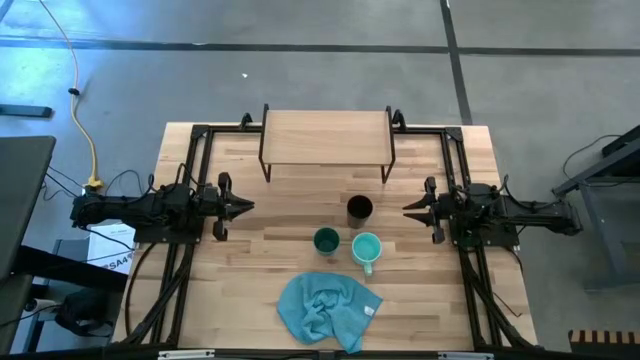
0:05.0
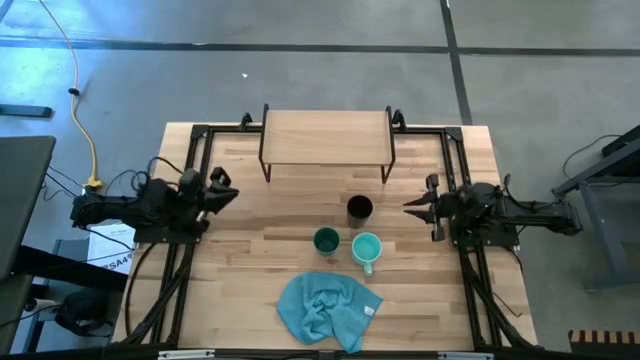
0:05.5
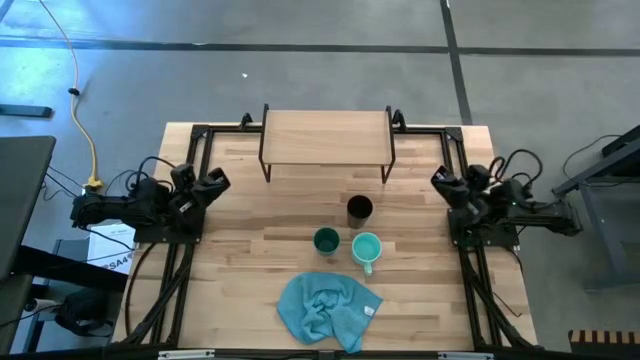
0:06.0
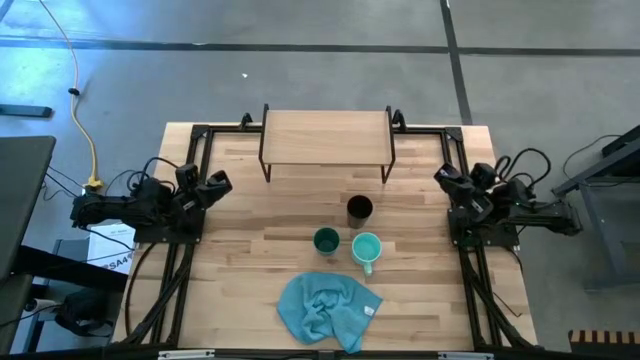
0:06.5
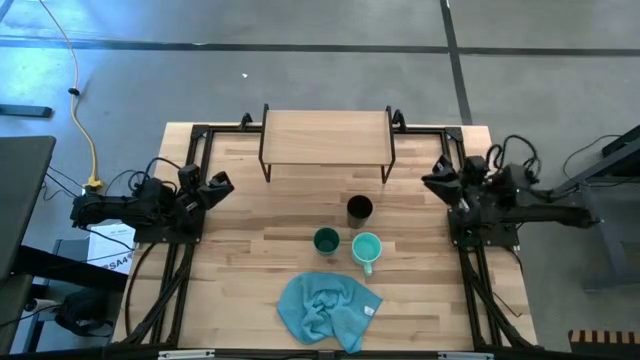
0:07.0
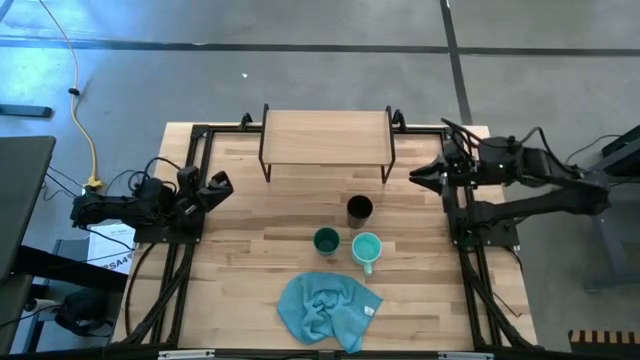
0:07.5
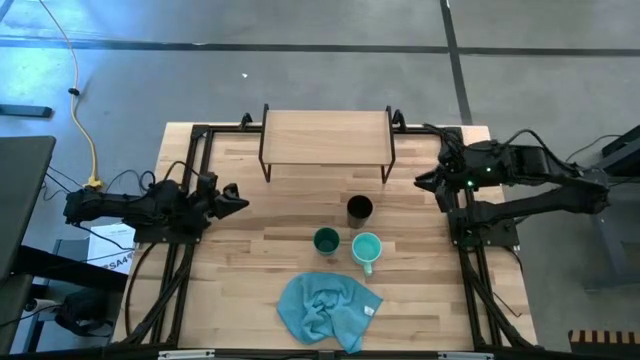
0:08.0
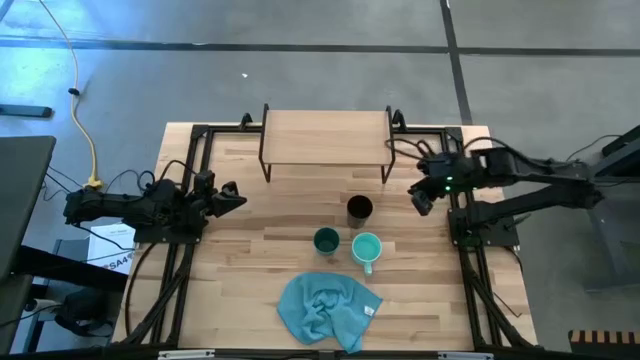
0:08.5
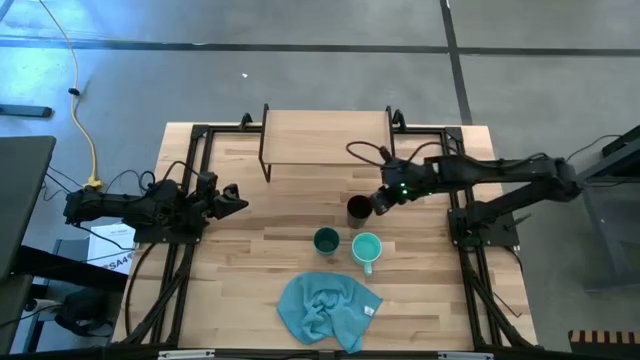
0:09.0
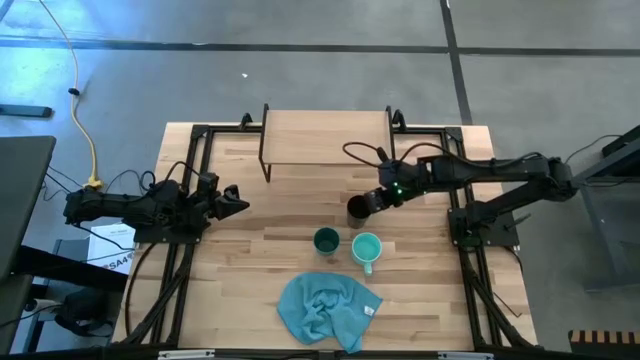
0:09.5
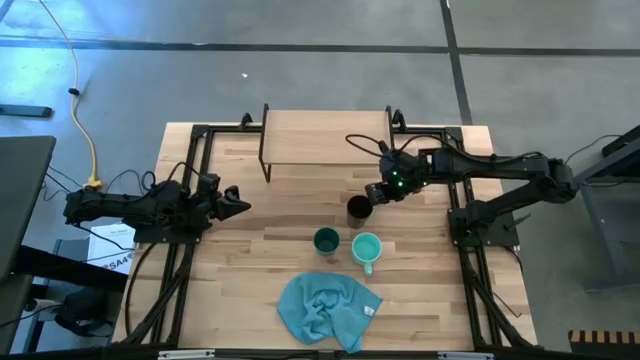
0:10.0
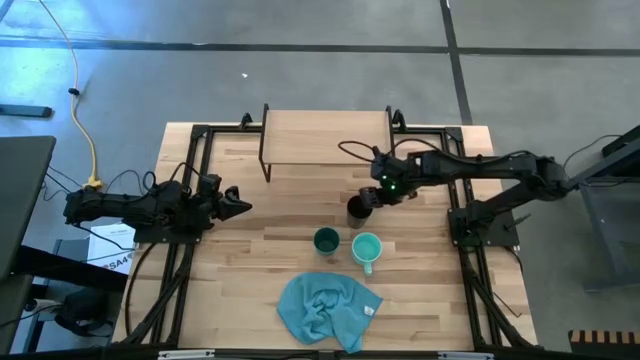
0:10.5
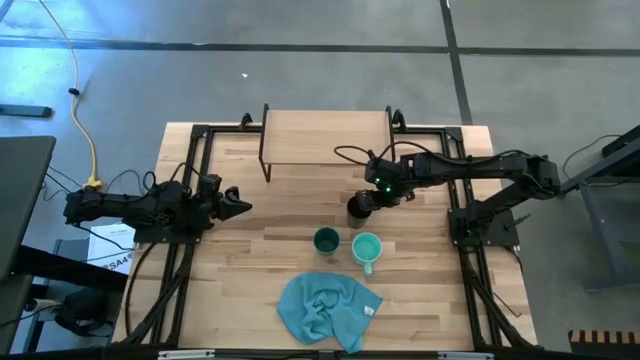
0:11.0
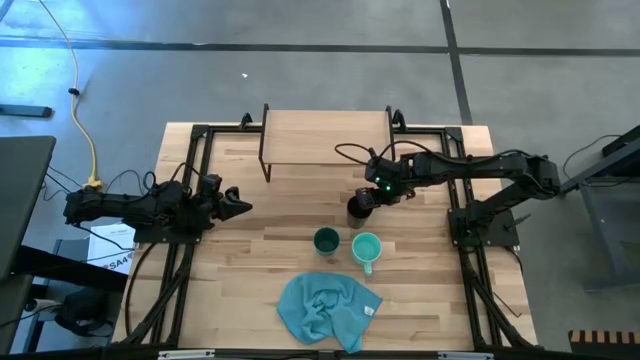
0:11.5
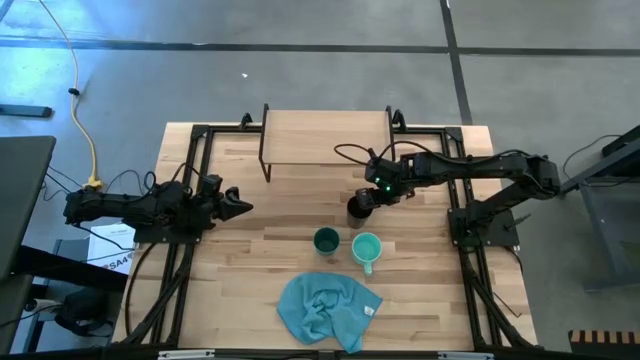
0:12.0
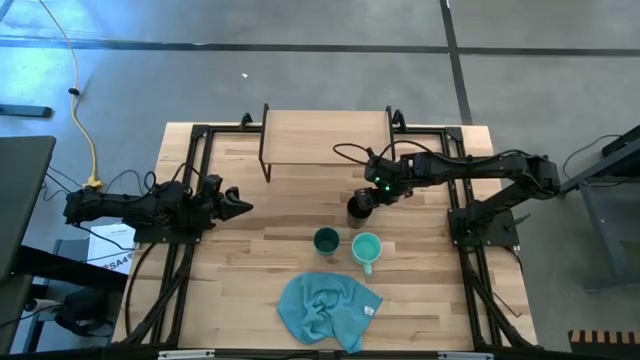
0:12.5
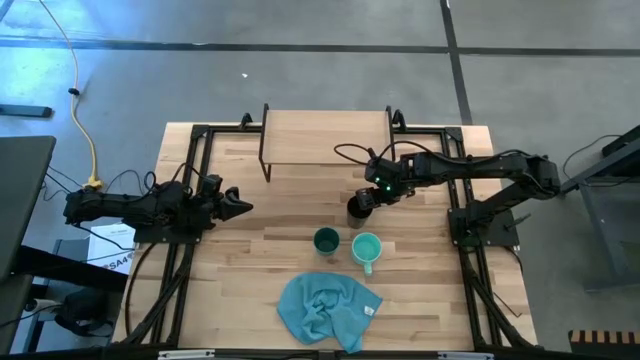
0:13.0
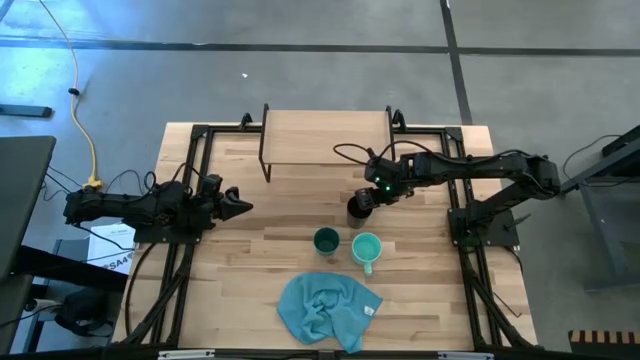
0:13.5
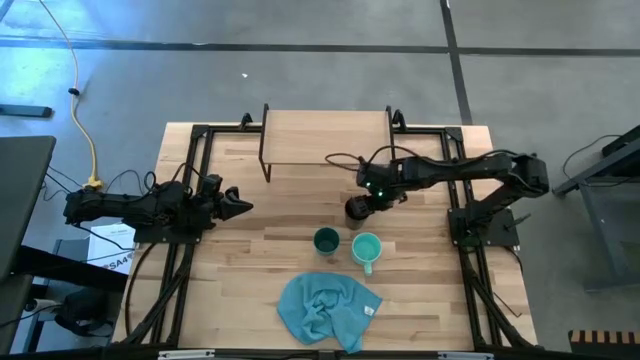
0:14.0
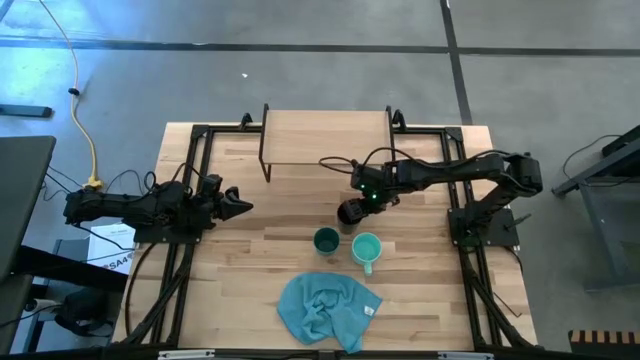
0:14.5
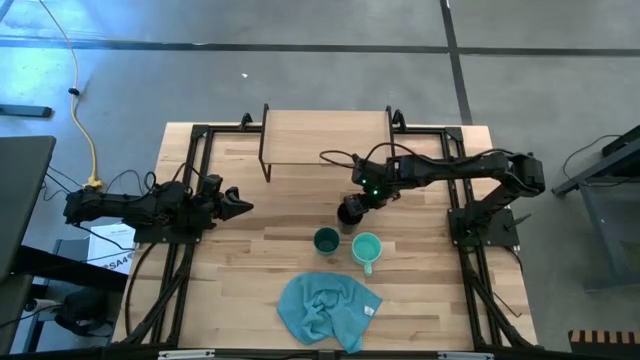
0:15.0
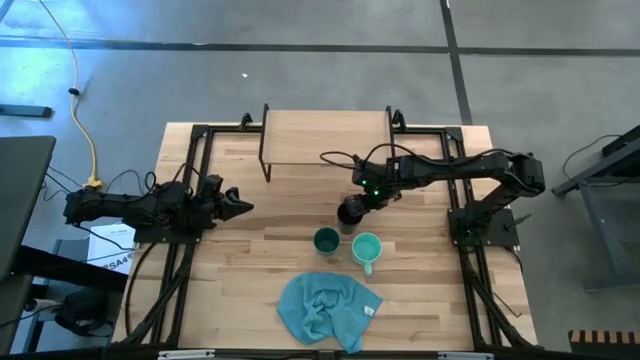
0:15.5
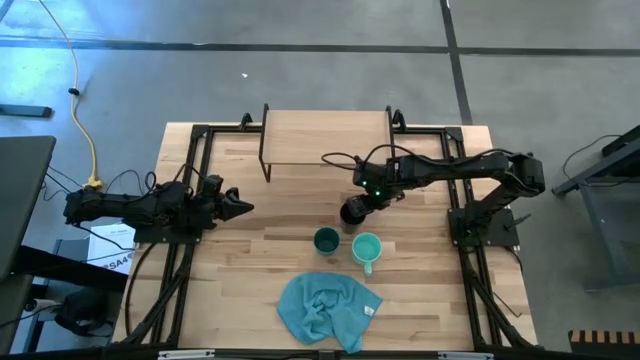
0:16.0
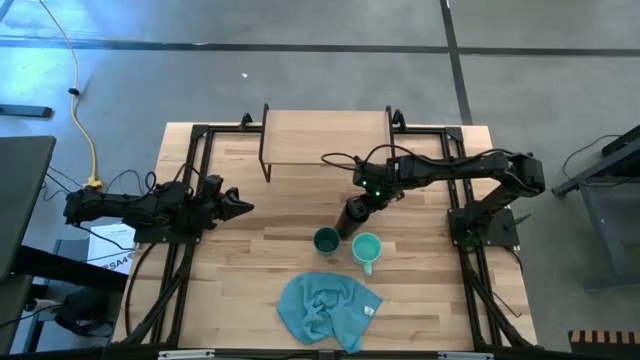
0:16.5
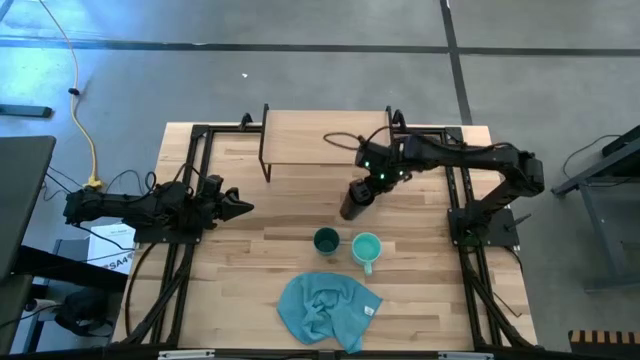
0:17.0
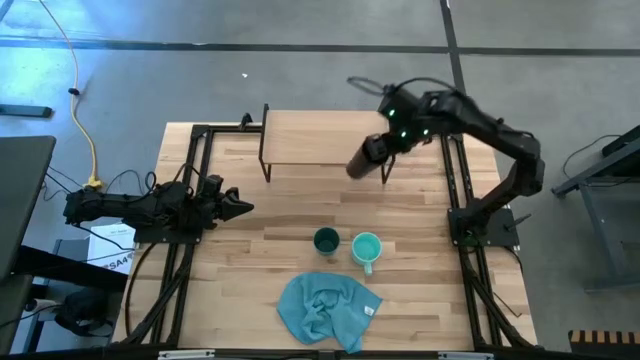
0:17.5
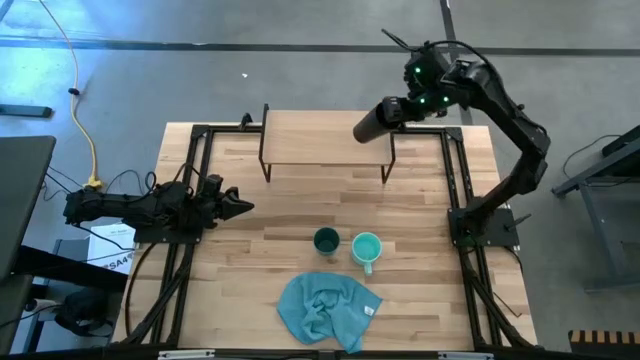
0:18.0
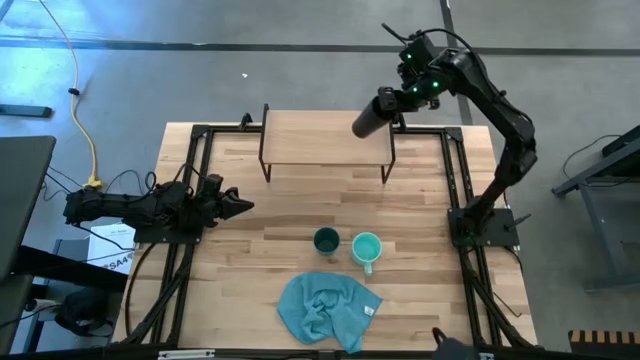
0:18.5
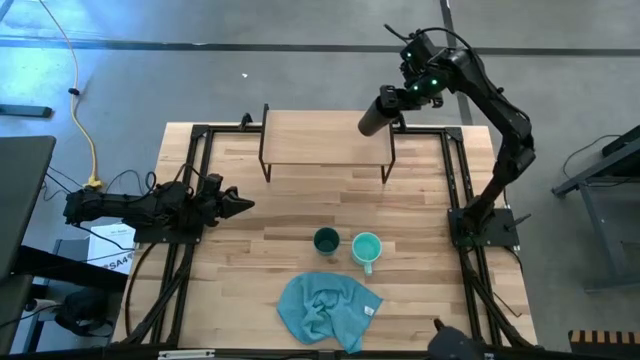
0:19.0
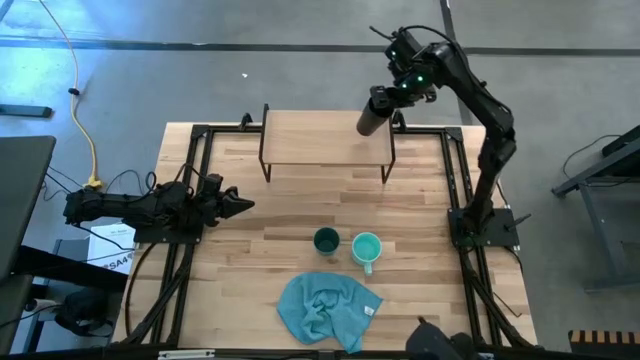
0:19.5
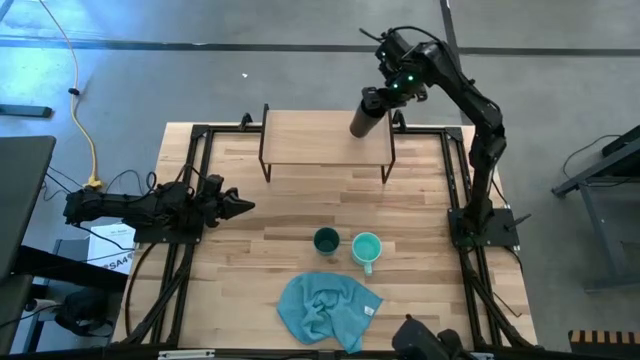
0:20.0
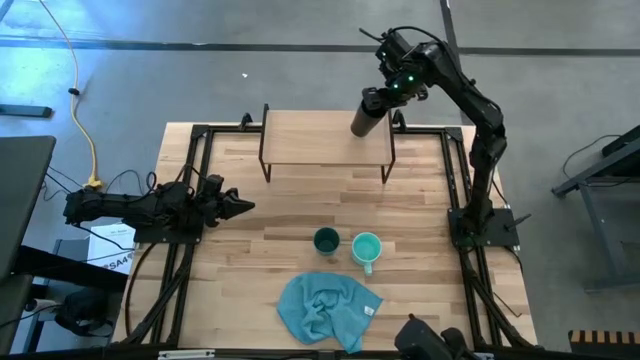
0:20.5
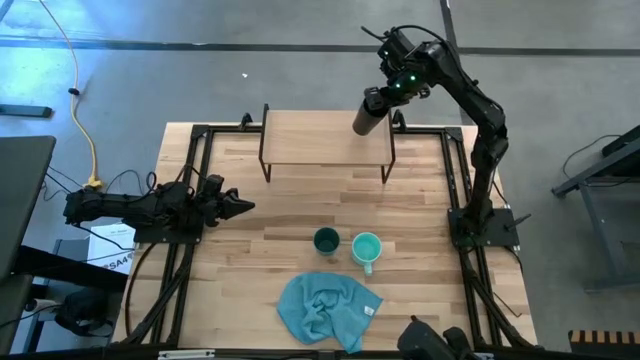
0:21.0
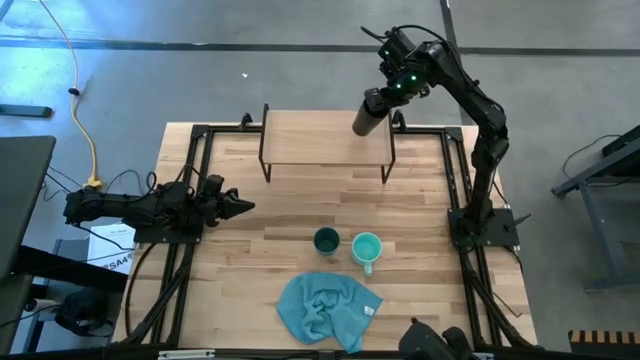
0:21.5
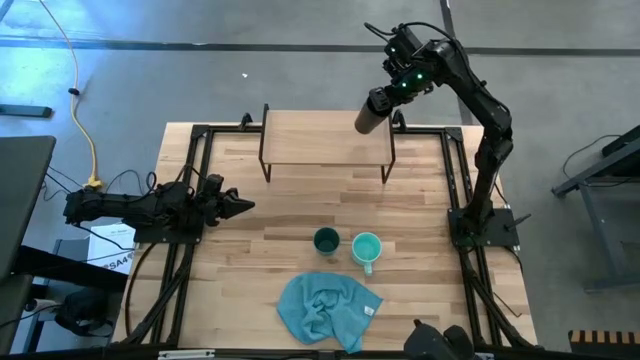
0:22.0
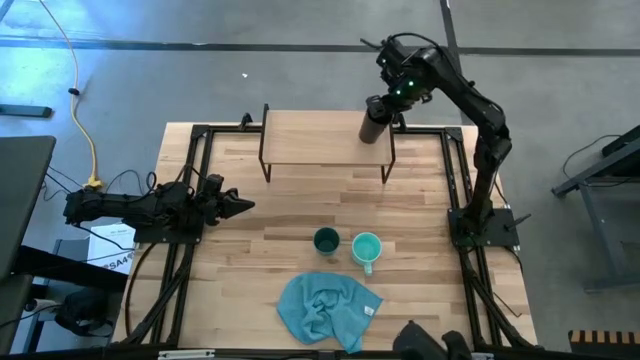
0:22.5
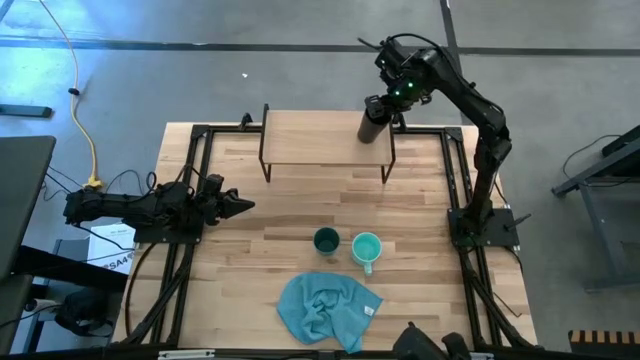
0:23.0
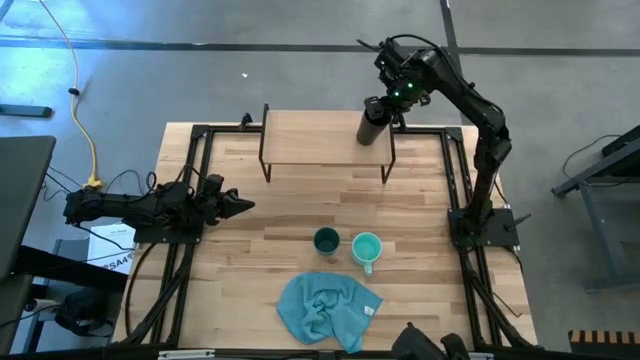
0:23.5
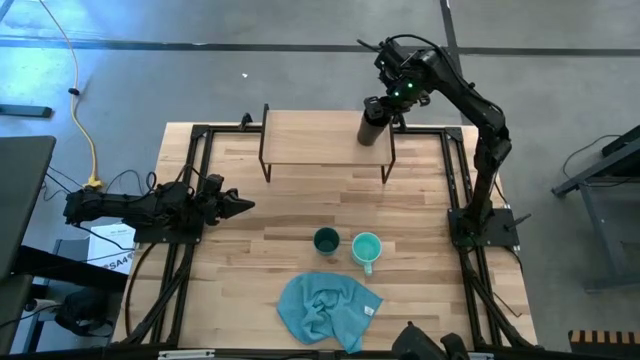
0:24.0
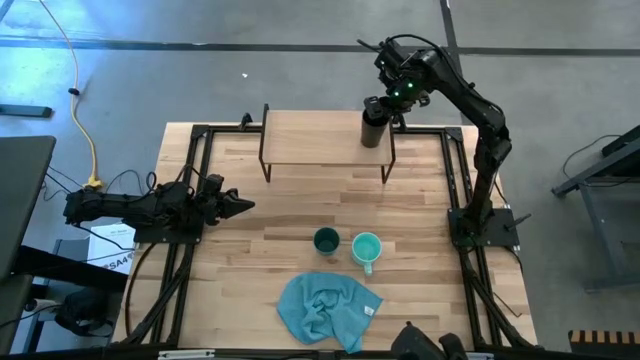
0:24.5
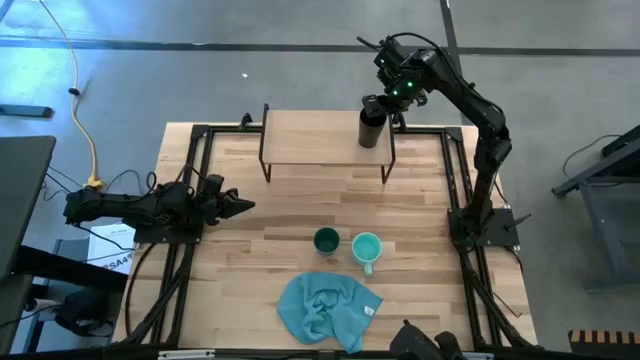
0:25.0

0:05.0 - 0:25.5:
Task: Stack small to large cups/mugs on shelf
Put the black cup on the shelf
